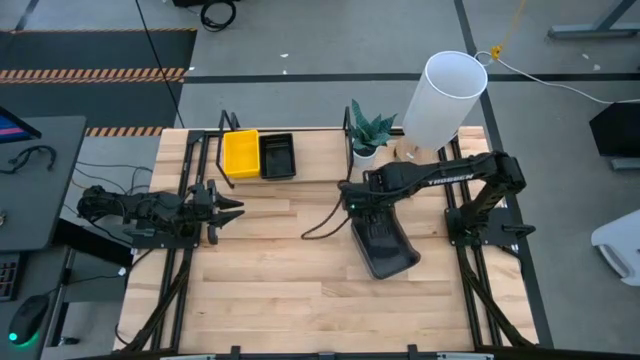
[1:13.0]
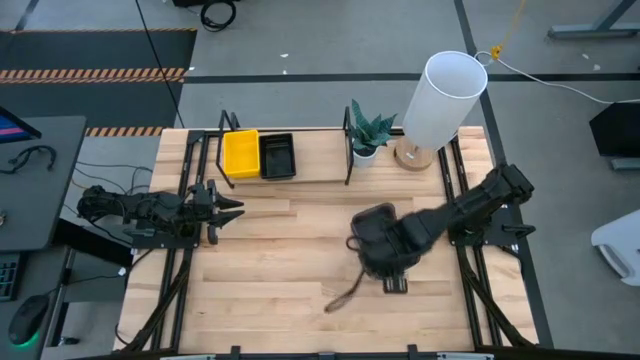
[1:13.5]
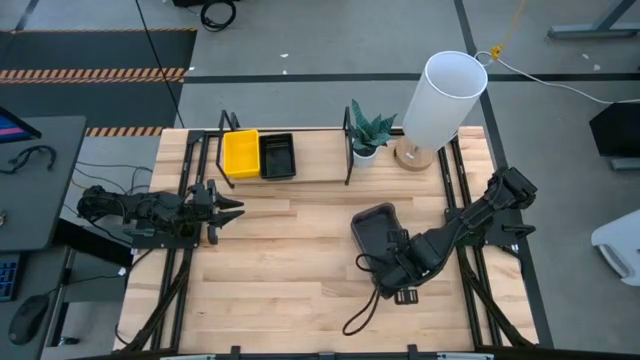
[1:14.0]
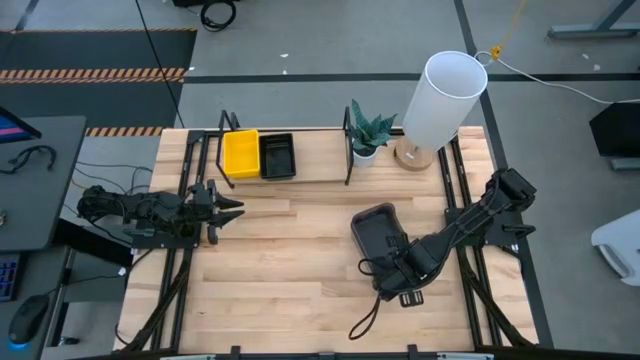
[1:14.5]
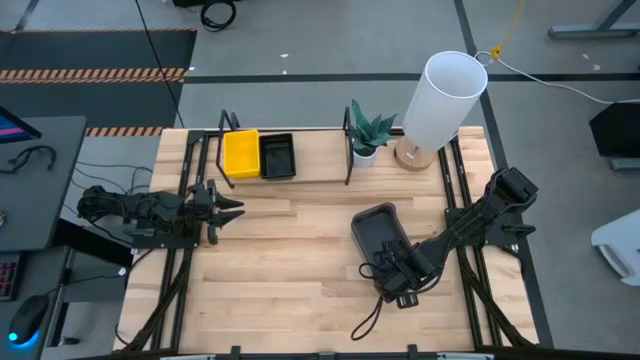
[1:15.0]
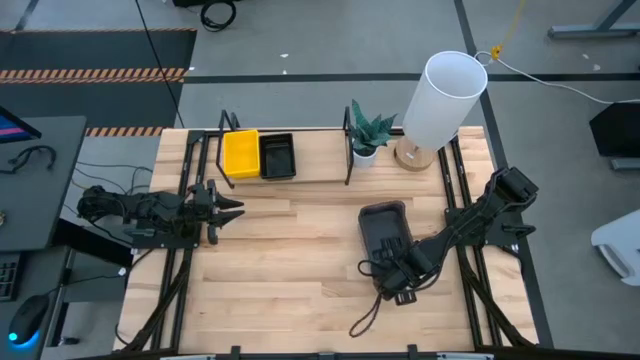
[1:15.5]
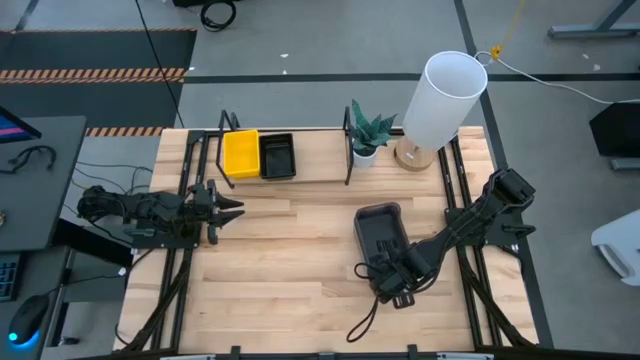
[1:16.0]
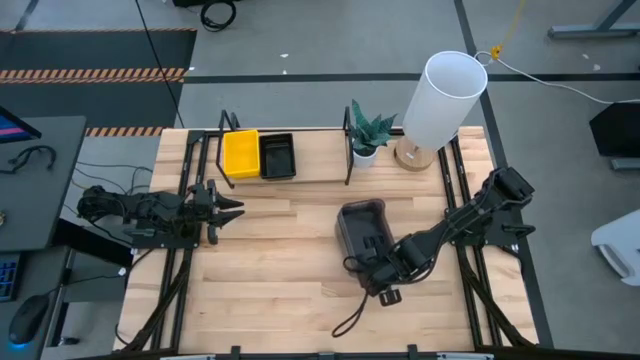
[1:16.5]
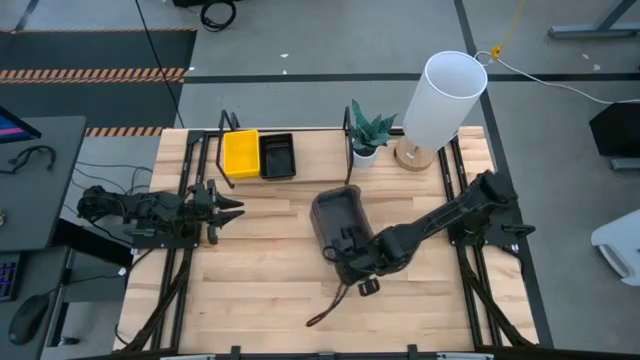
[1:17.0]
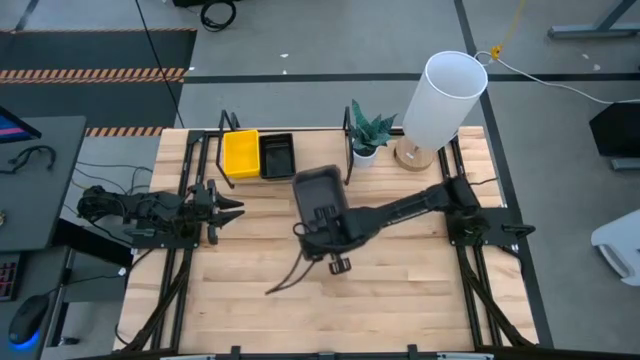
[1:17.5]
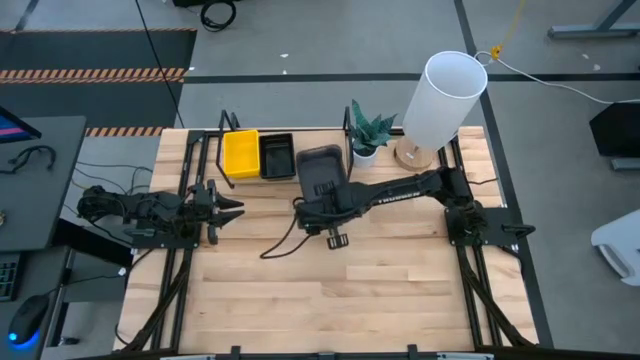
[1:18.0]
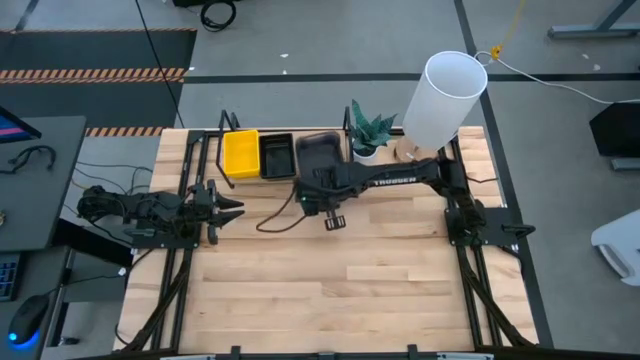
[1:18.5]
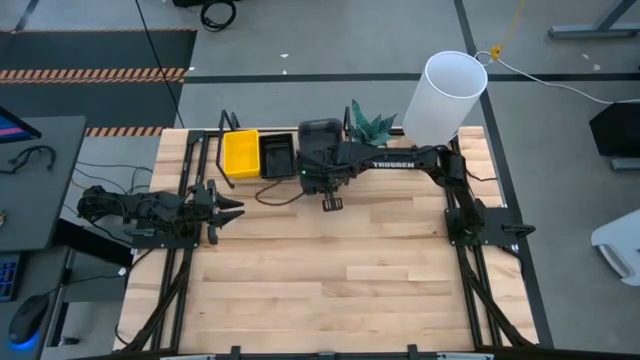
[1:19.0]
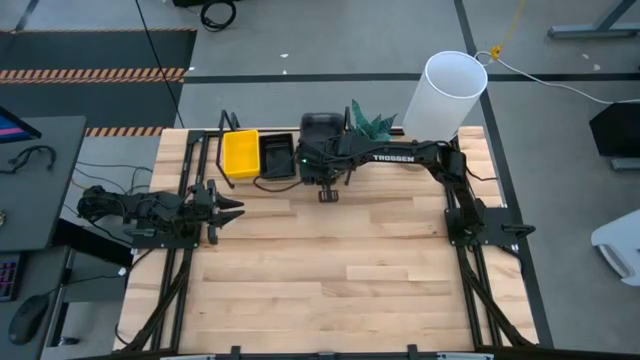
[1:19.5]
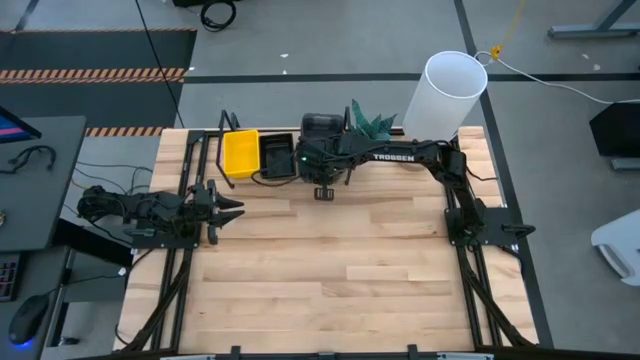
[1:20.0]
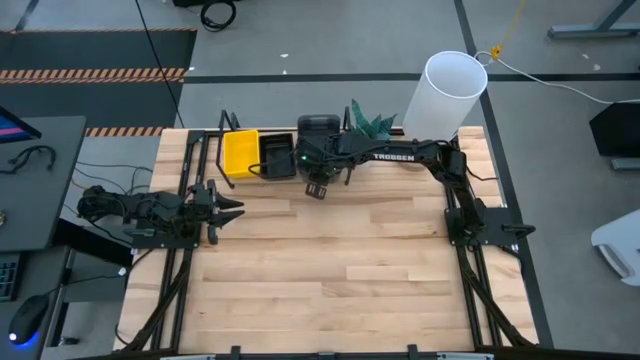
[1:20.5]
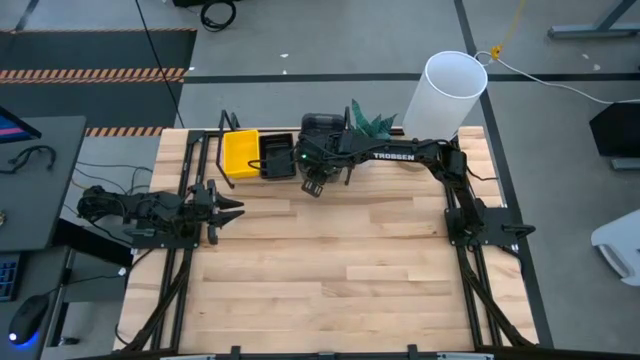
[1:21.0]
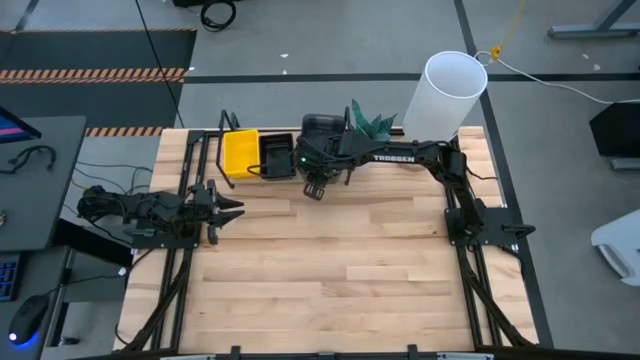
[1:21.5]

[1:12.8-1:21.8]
Task: Stack baskets on shelf by color
Put the black transparent bins on the shelf

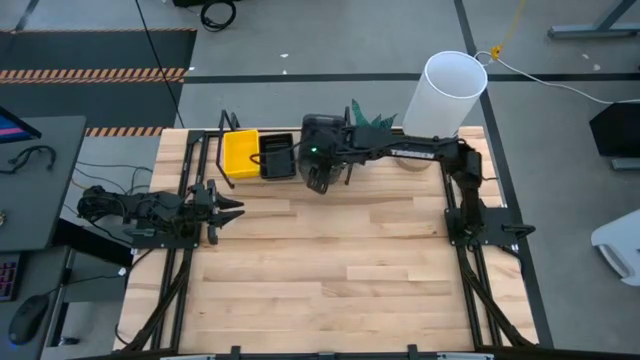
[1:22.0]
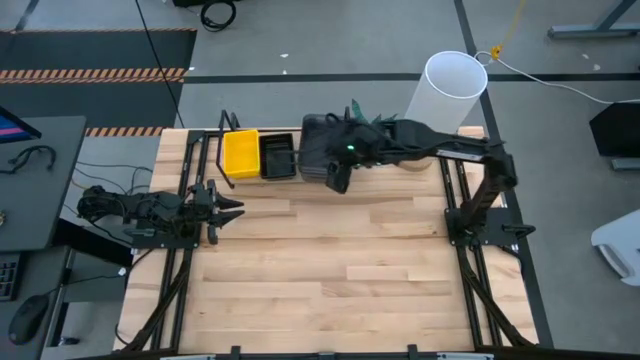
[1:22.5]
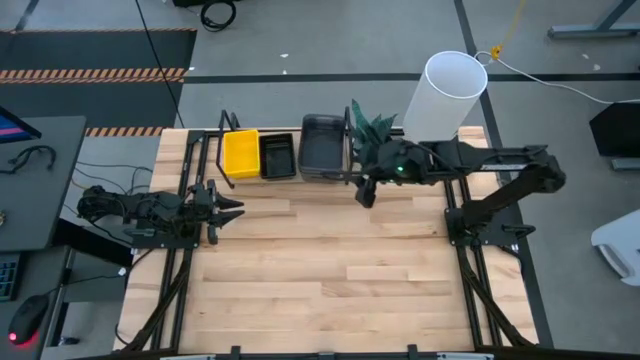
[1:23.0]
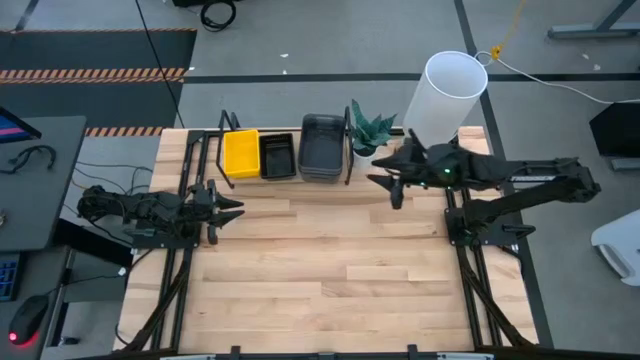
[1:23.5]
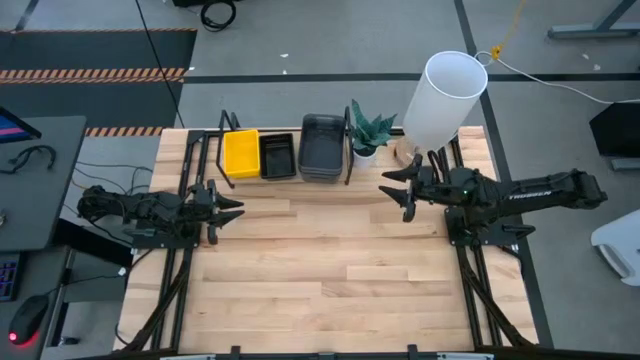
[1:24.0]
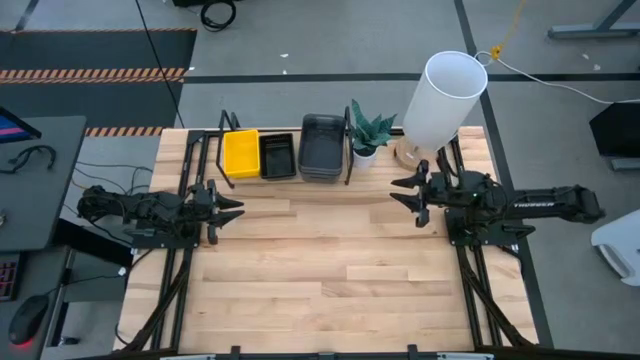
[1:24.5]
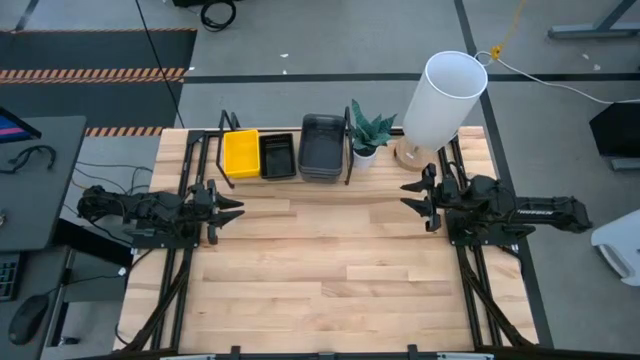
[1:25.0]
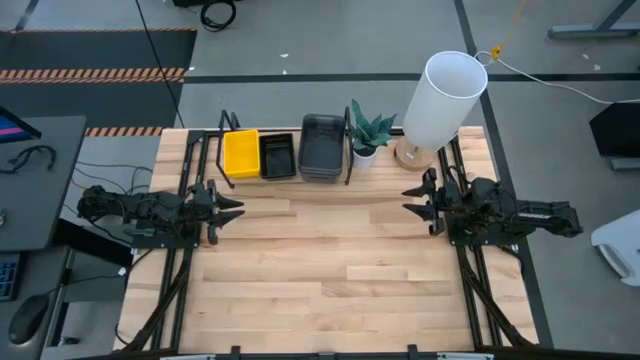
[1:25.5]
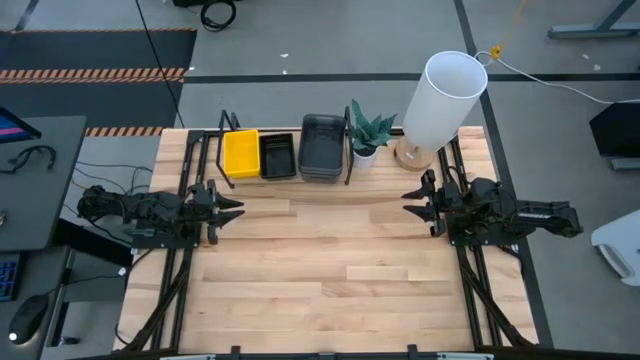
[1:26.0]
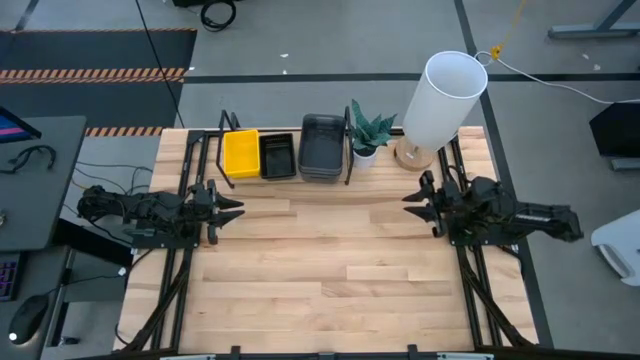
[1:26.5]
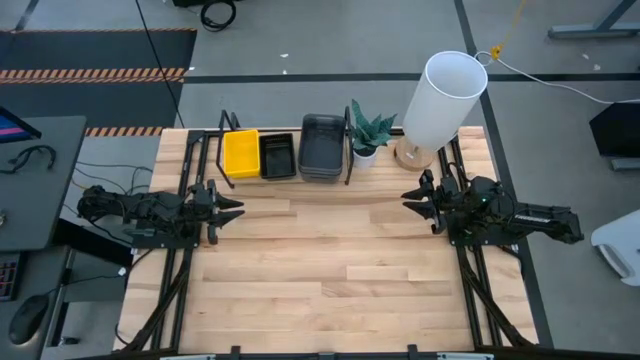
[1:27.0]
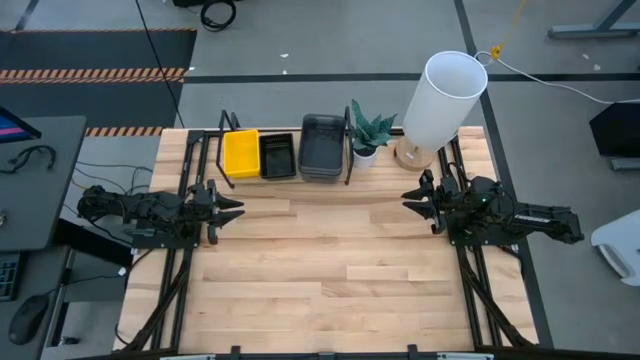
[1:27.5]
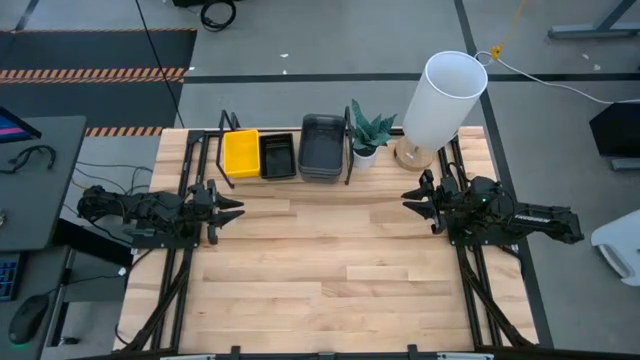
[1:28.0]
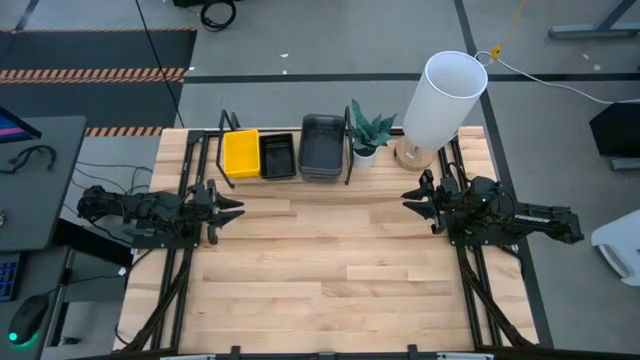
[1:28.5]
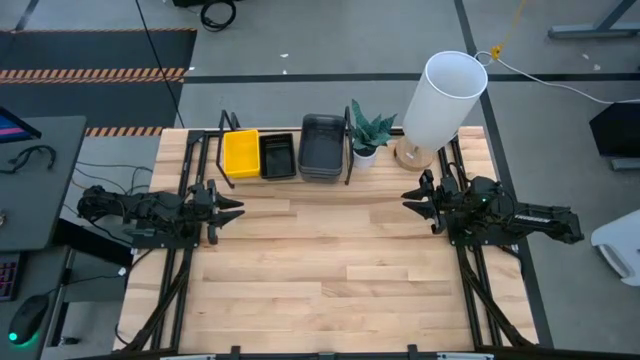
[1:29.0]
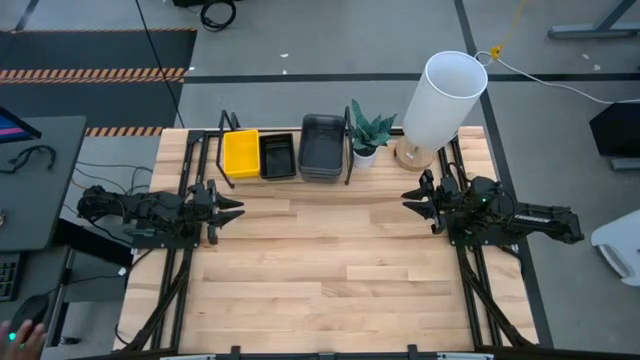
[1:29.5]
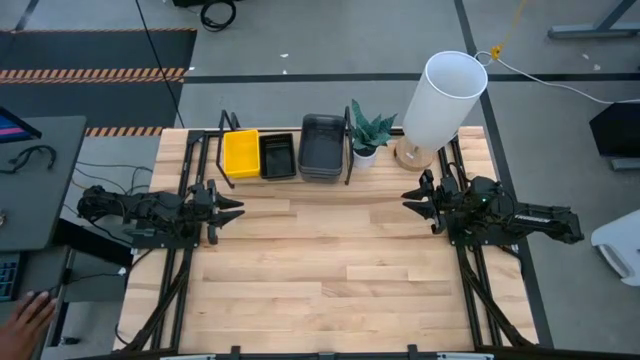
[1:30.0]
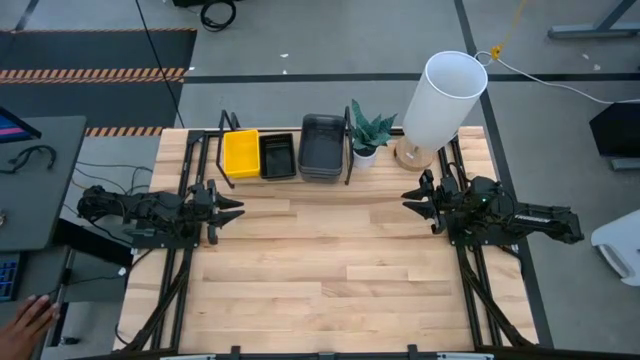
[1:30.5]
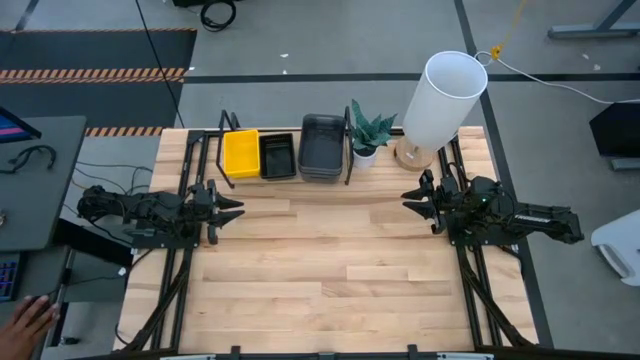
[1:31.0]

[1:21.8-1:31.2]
Return to Home Position
